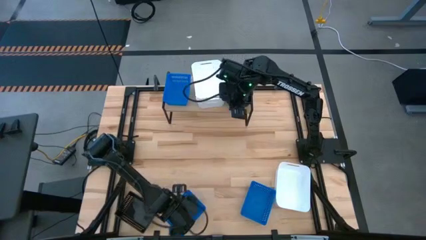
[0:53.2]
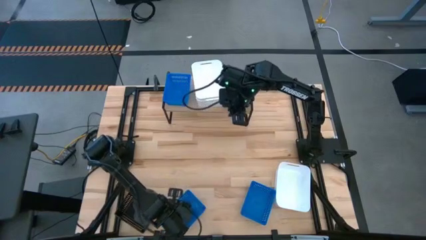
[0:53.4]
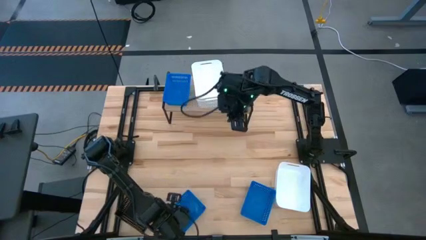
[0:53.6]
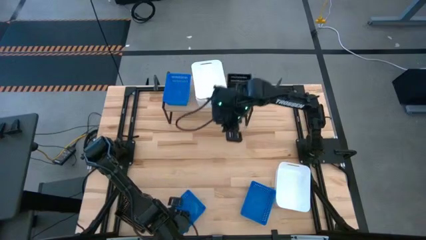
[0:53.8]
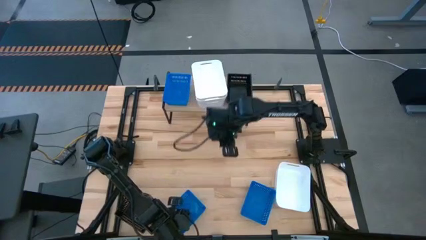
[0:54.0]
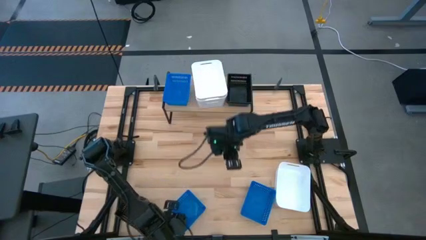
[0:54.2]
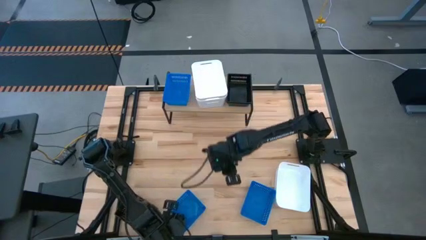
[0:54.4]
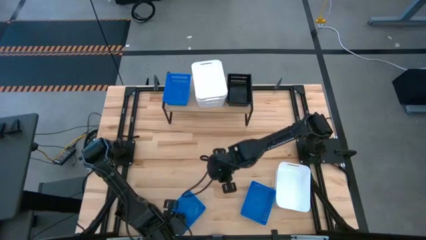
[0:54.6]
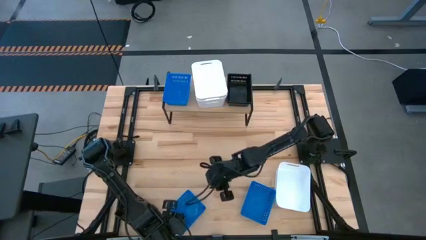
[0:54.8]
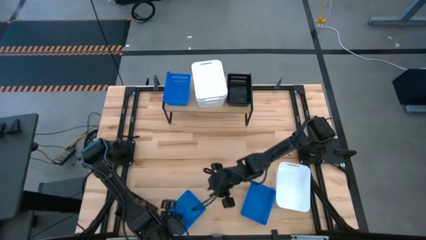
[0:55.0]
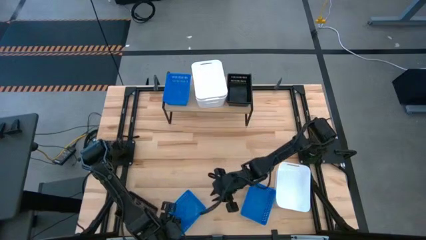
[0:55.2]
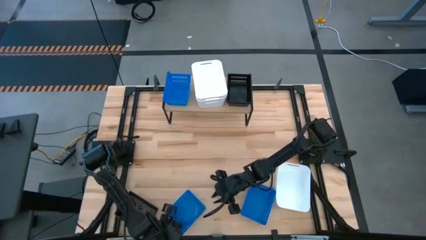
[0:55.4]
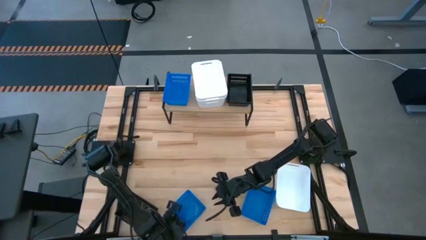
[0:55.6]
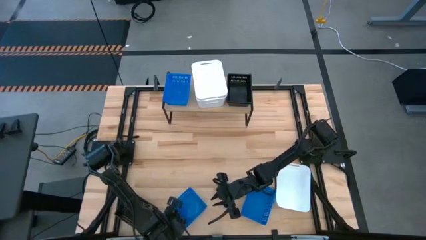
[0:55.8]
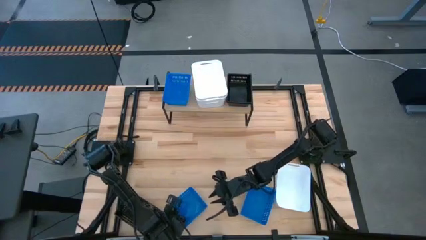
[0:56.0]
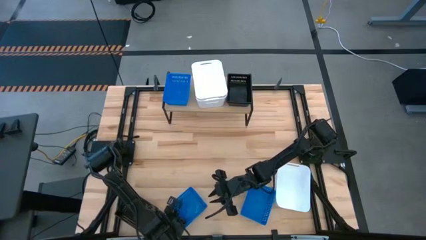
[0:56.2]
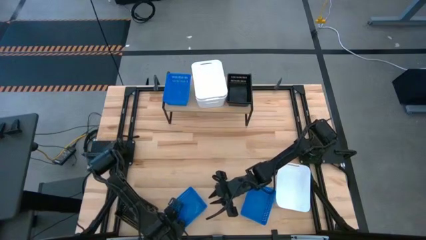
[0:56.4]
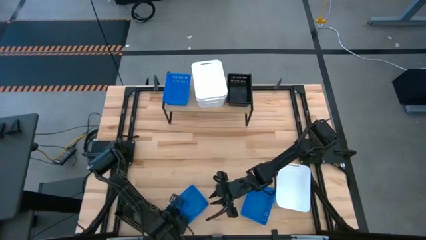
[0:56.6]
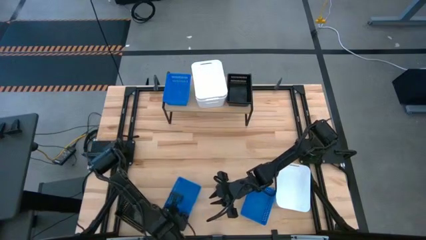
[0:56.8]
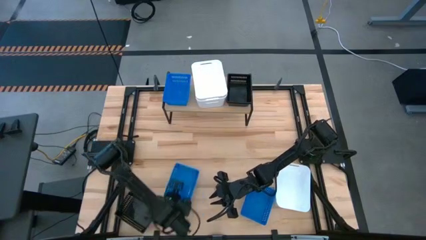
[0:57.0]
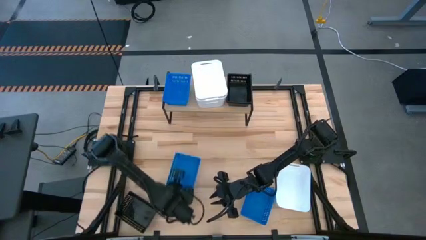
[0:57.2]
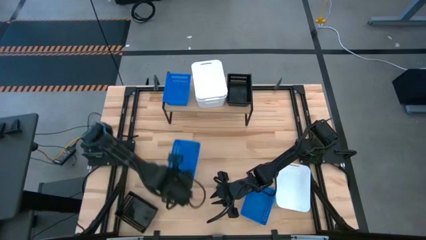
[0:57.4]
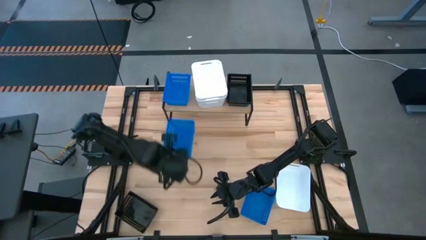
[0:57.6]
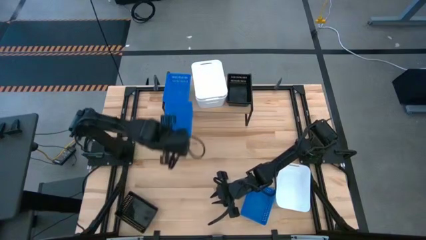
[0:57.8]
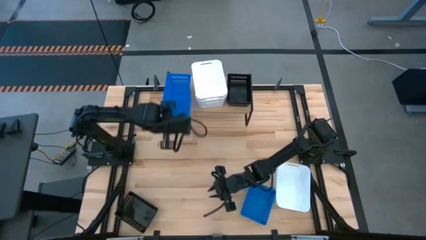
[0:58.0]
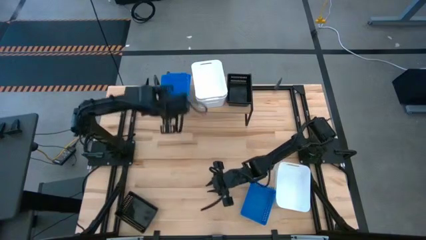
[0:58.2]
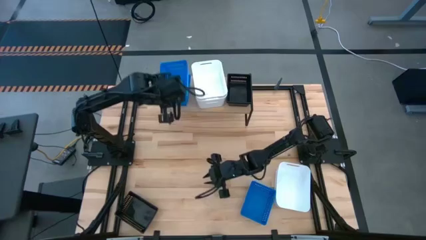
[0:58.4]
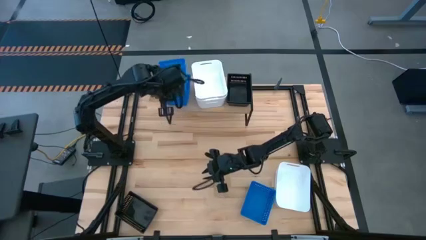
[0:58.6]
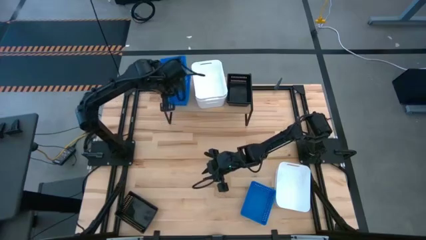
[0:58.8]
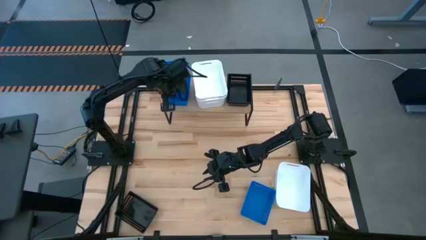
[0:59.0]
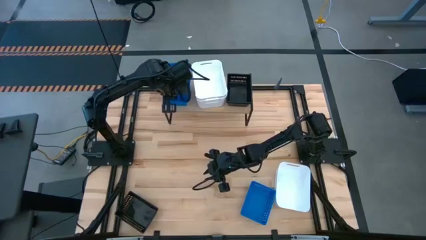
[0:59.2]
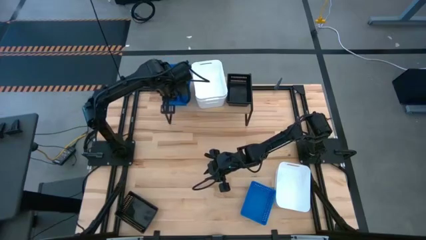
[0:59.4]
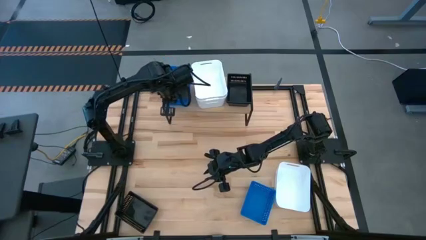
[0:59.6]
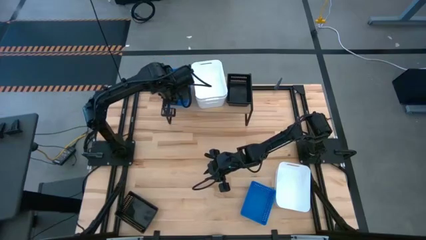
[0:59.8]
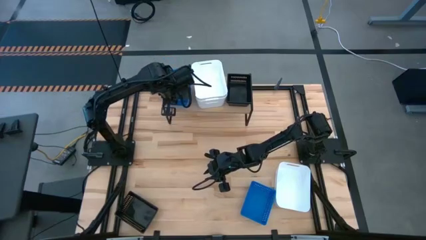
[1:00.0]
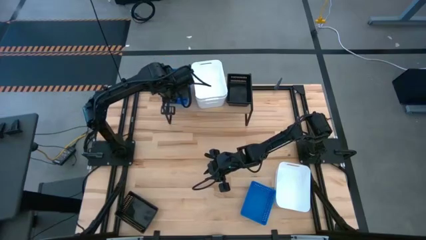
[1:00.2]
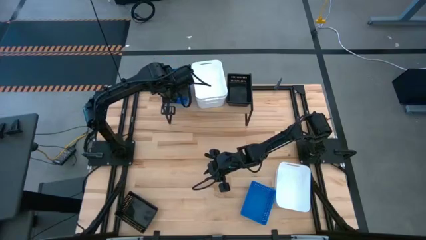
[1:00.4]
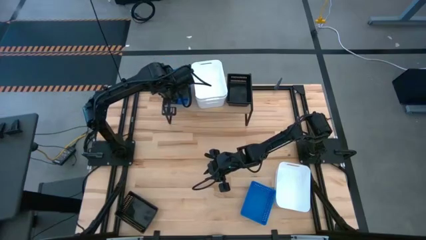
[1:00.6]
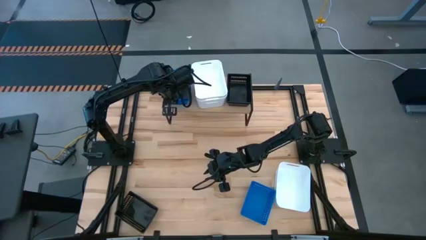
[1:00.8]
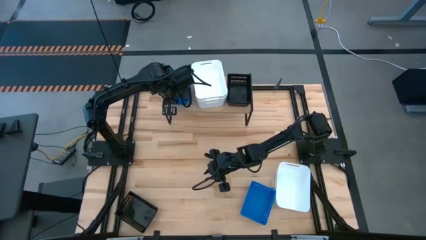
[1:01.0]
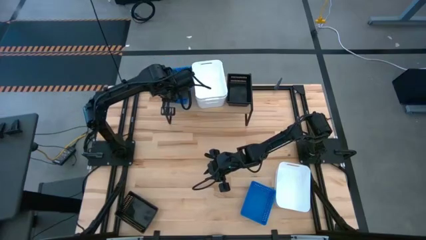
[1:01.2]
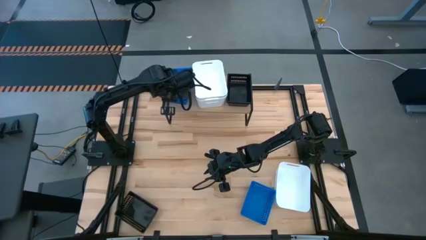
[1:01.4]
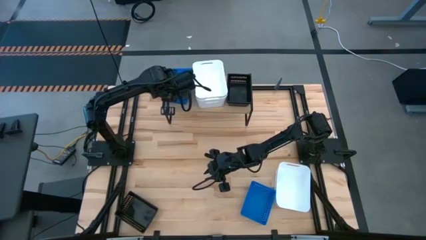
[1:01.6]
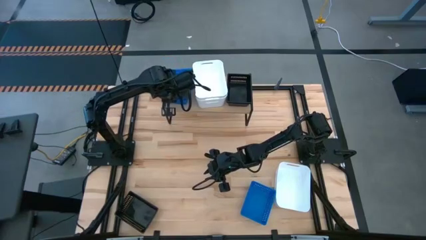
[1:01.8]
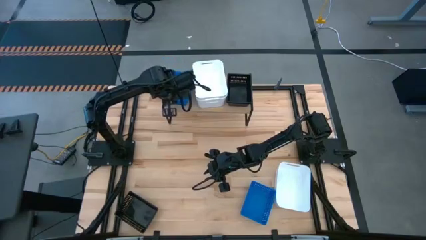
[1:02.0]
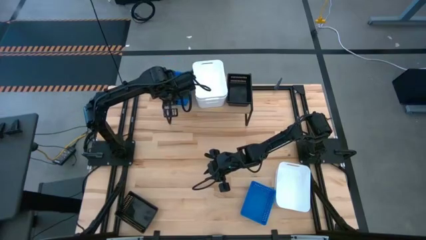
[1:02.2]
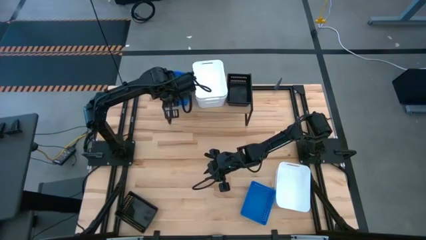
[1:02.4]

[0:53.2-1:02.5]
Task: Stack baskets on shelf by color
Stack the bottom left blue bin into the blue bin on the shelf

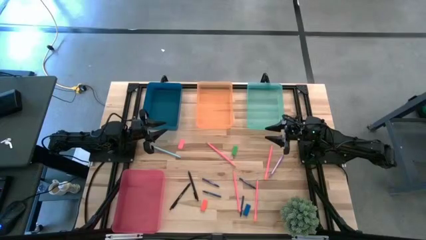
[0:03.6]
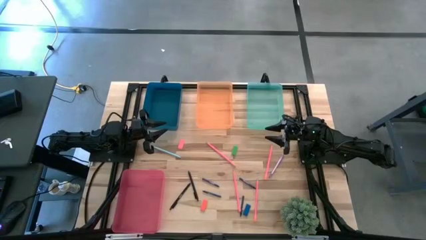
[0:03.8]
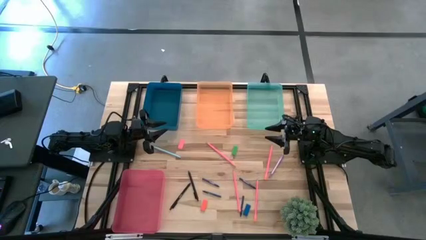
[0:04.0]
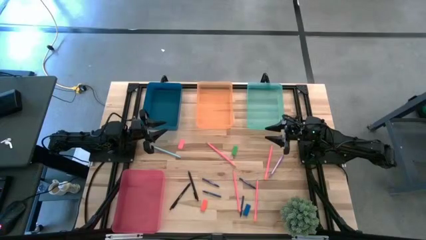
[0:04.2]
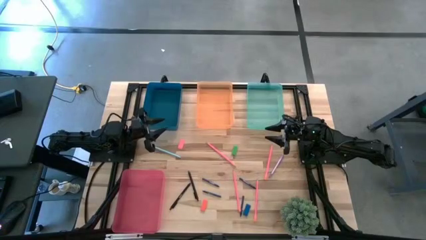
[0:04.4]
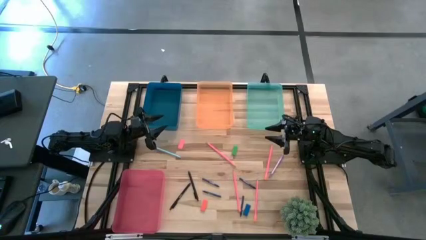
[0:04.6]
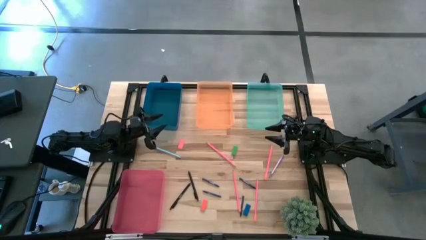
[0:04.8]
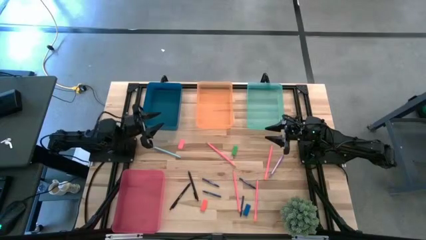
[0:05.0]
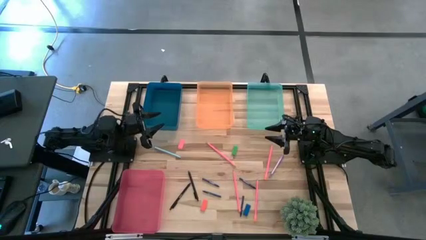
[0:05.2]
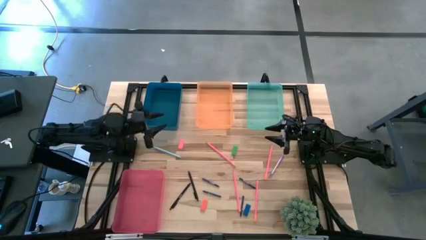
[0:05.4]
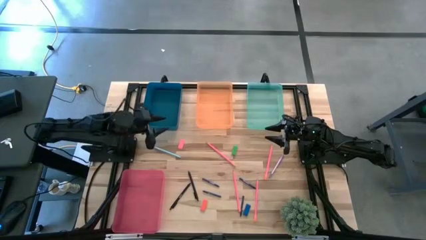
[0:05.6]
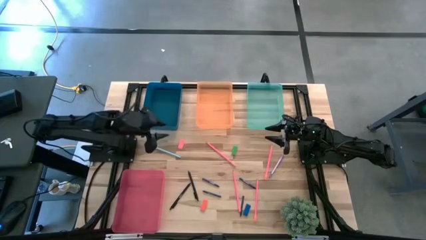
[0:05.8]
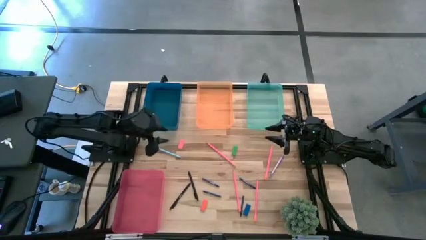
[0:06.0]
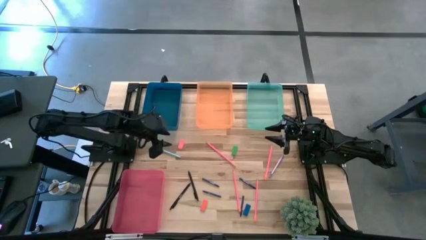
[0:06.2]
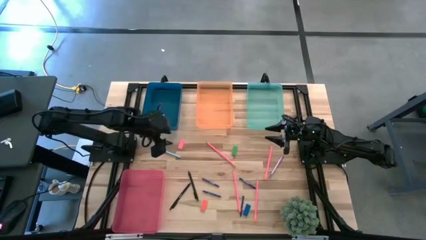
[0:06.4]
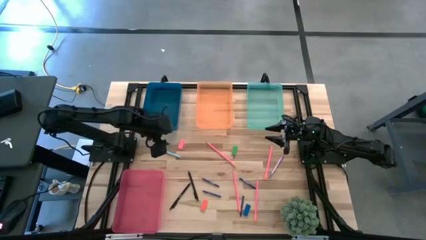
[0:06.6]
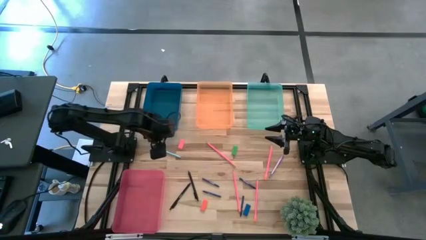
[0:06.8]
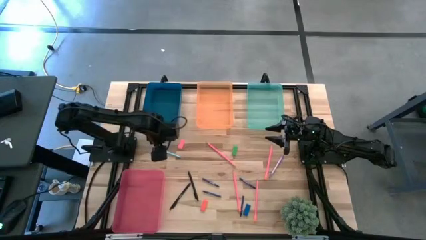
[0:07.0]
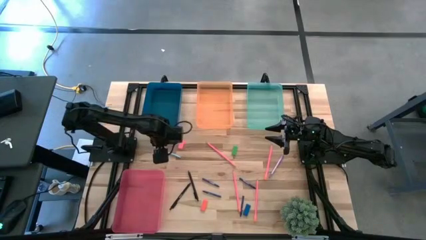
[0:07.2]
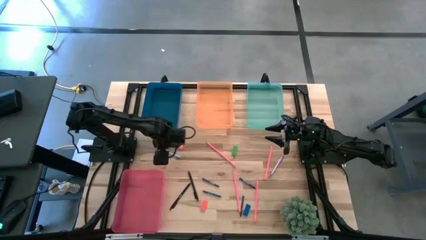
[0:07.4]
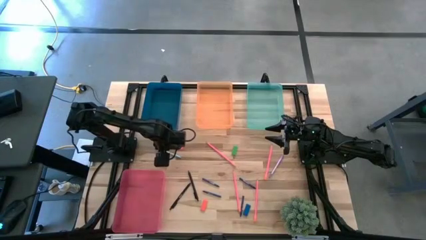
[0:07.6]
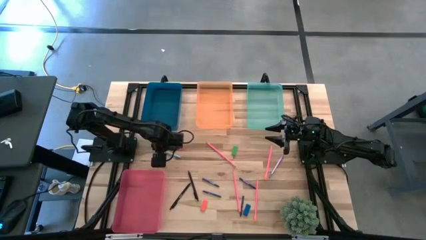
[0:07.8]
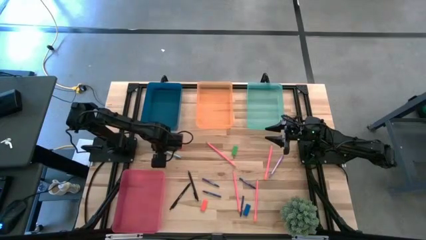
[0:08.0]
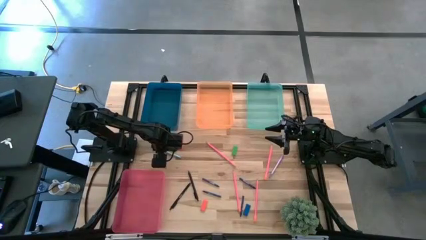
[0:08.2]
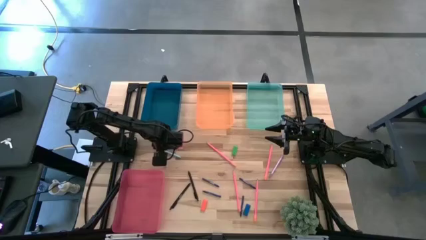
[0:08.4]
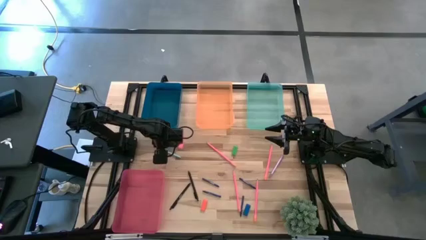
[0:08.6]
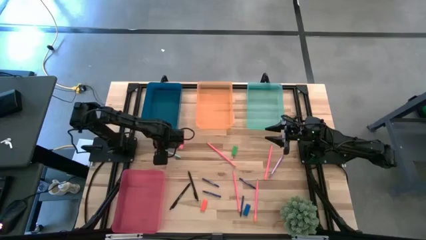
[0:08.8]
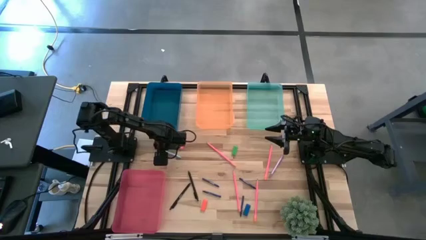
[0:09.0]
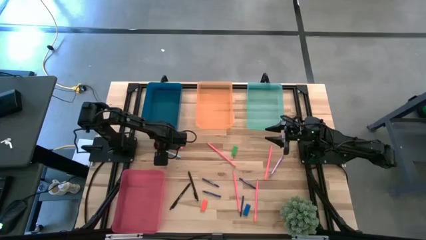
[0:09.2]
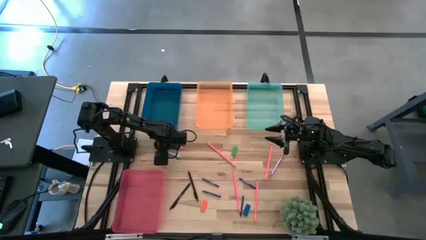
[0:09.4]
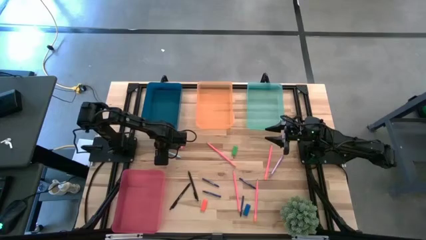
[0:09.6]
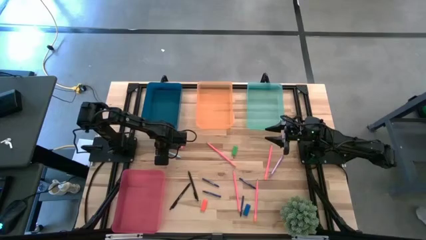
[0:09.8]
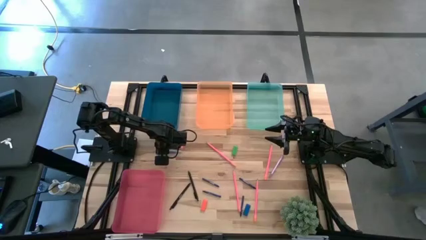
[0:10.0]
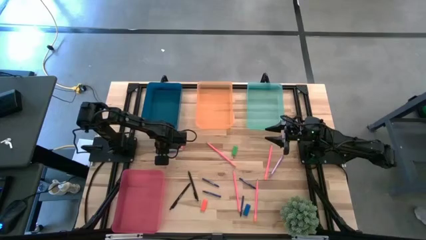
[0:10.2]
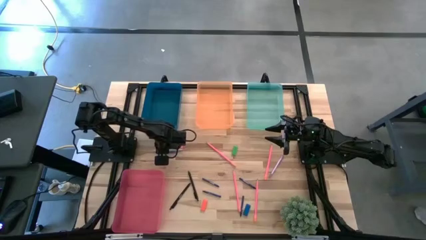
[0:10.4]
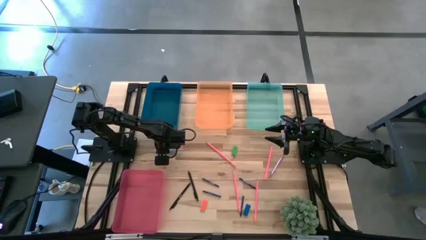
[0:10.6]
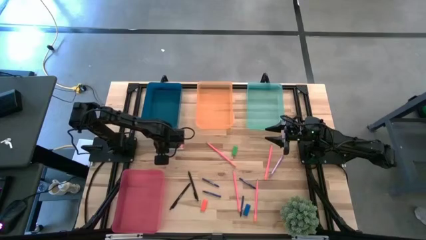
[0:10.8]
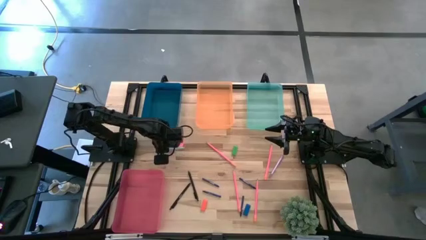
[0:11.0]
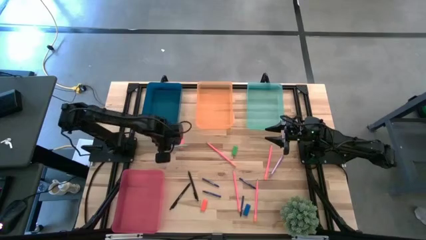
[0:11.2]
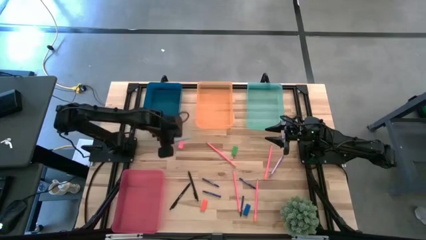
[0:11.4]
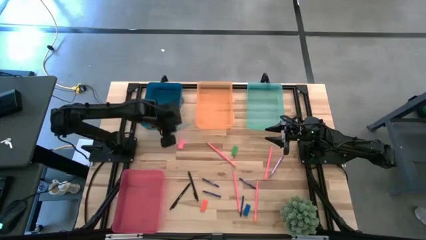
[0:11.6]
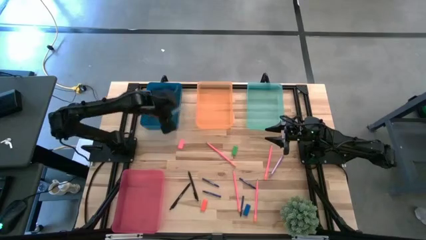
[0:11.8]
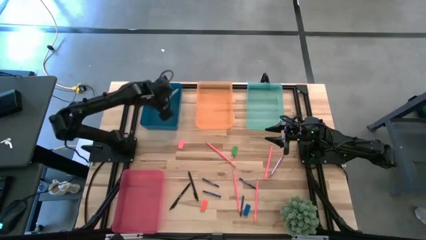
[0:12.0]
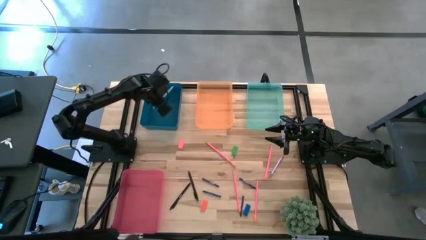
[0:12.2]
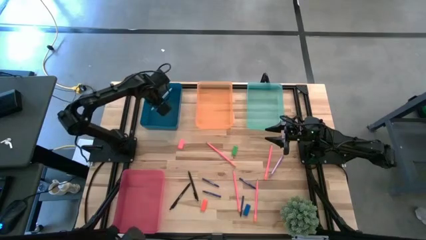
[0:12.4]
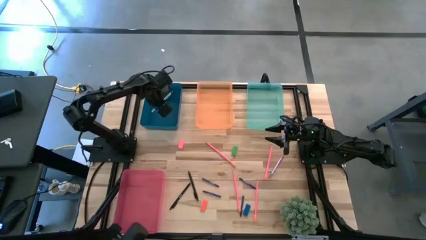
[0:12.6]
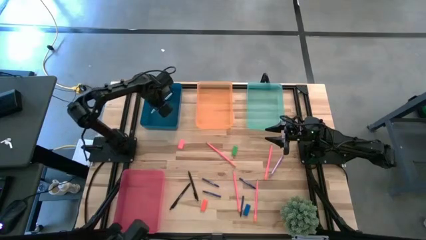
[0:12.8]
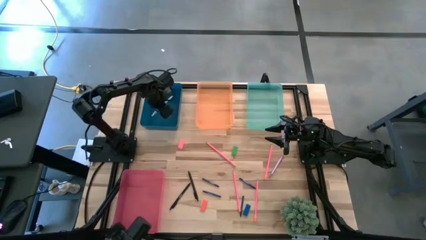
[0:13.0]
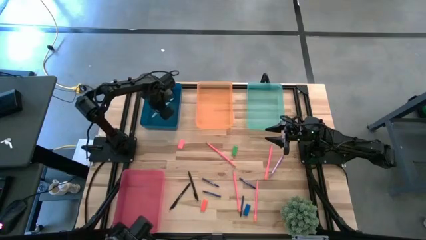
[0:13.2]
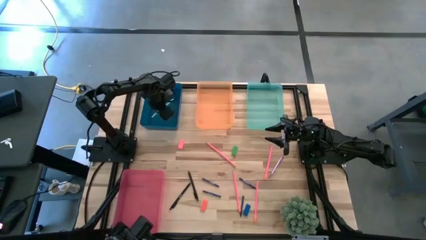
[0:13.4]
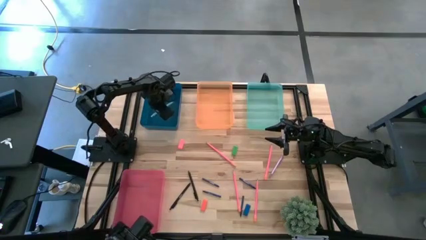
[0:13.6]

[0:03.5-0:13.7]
Task: Sort crayons/erasers/pens/pencils in bins
Put the blue pen into the blue bin
